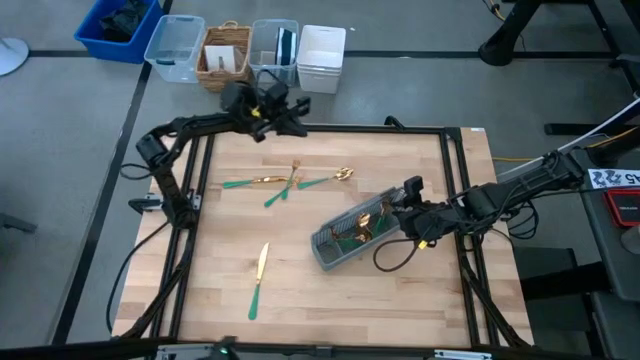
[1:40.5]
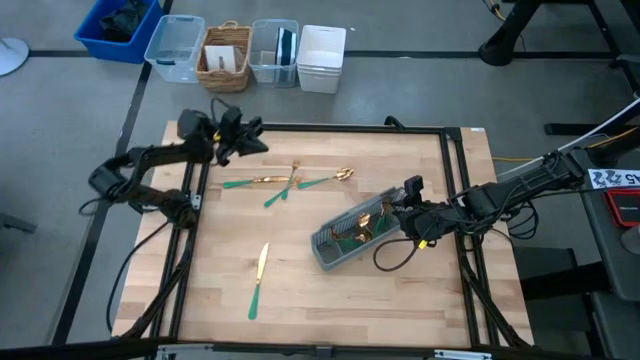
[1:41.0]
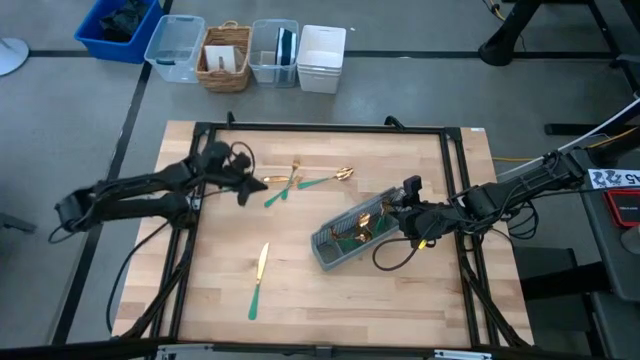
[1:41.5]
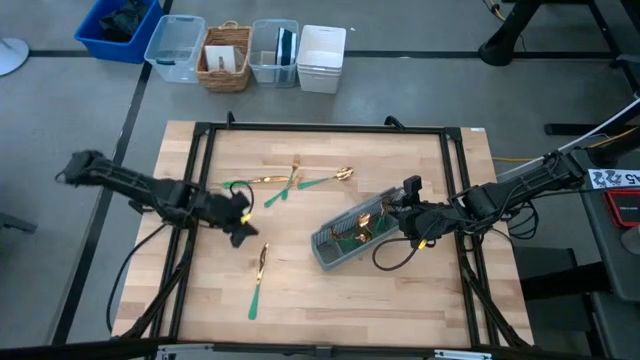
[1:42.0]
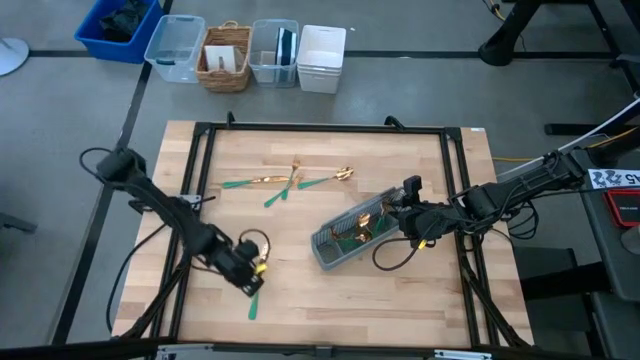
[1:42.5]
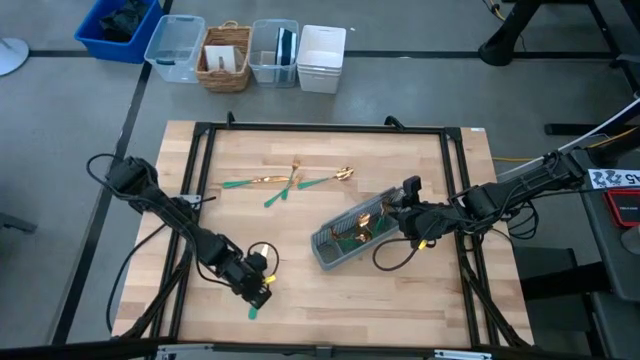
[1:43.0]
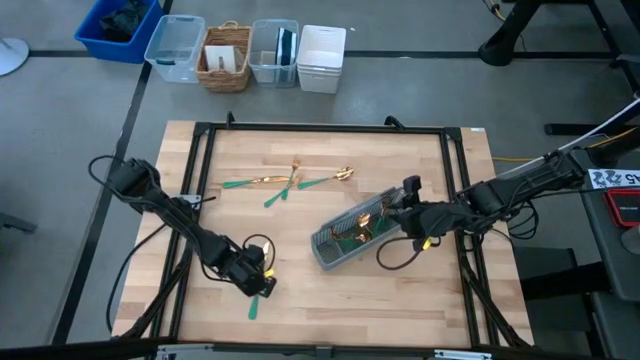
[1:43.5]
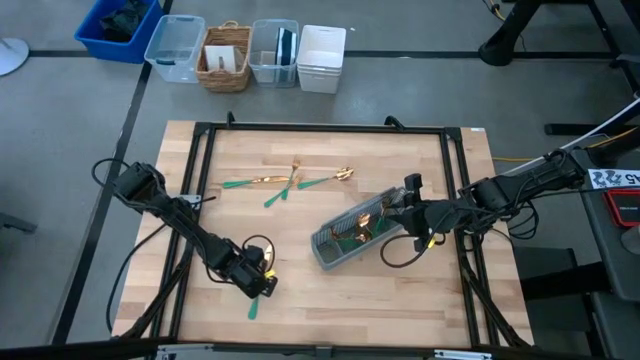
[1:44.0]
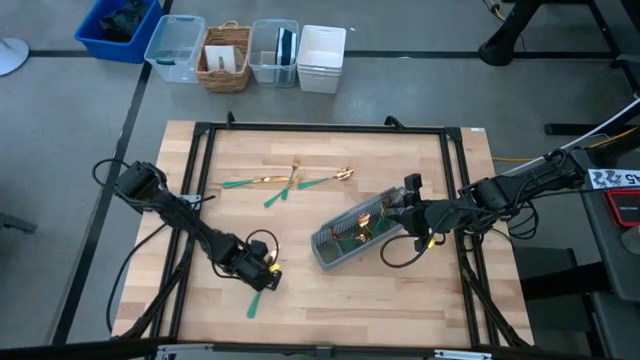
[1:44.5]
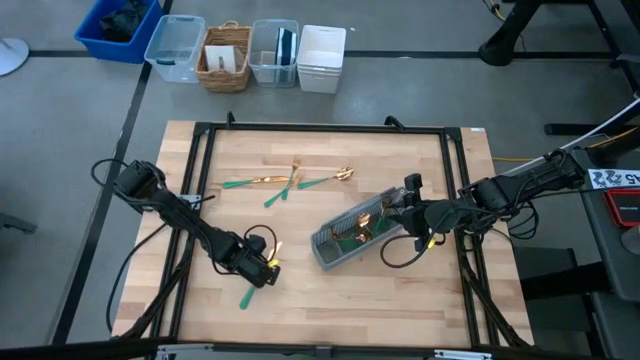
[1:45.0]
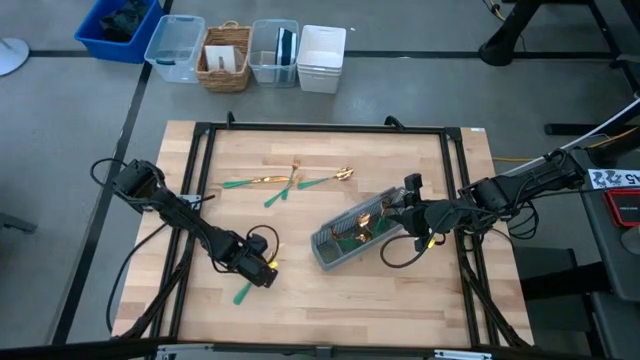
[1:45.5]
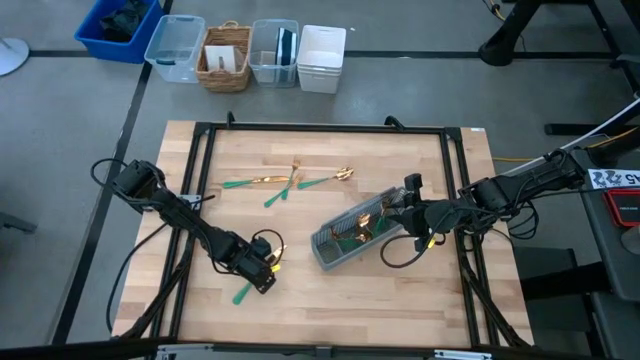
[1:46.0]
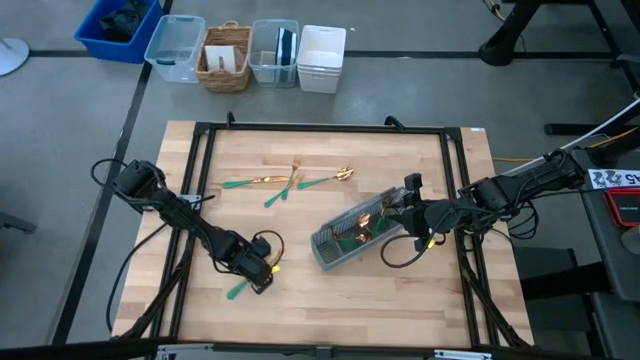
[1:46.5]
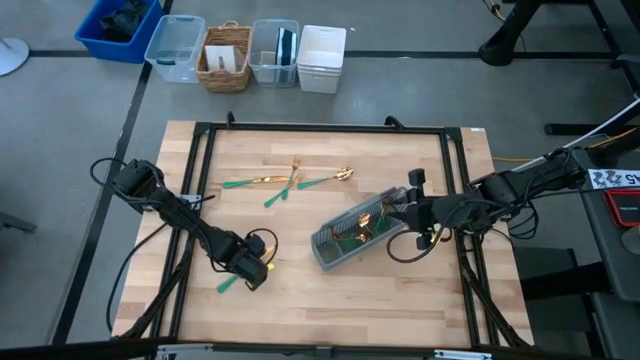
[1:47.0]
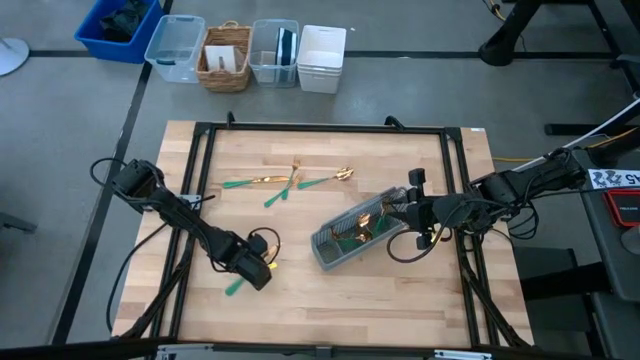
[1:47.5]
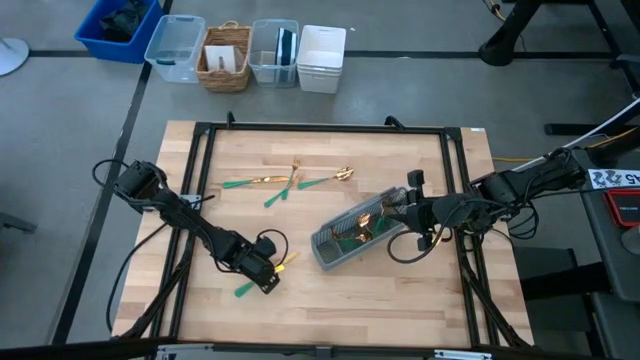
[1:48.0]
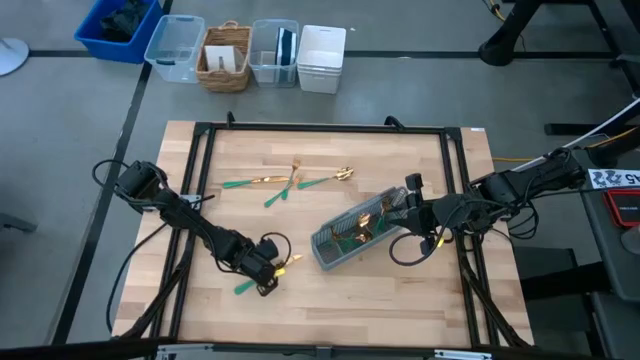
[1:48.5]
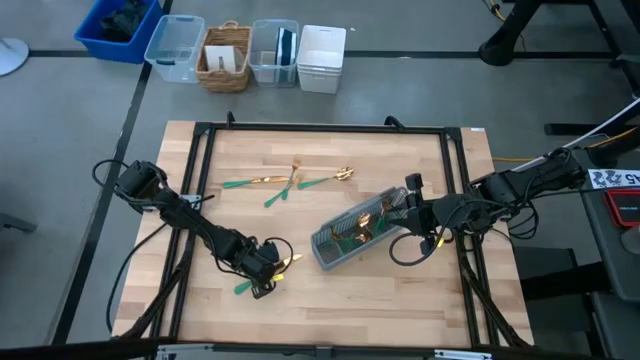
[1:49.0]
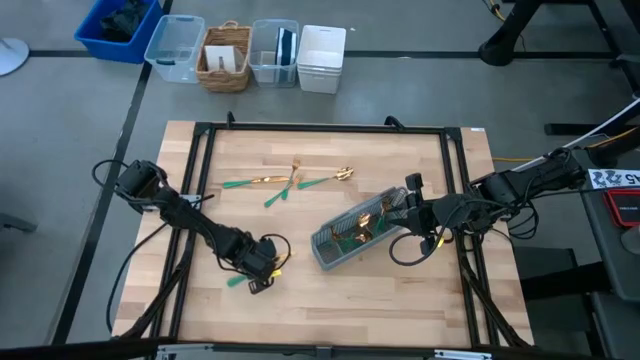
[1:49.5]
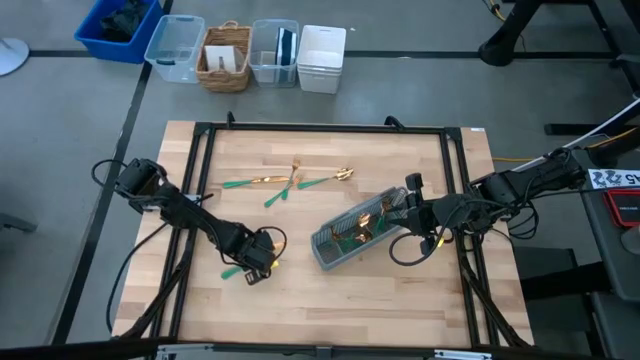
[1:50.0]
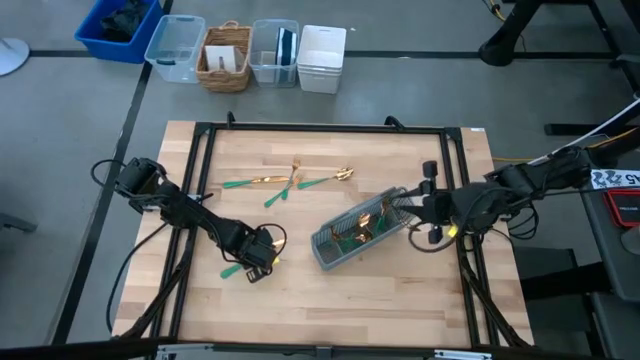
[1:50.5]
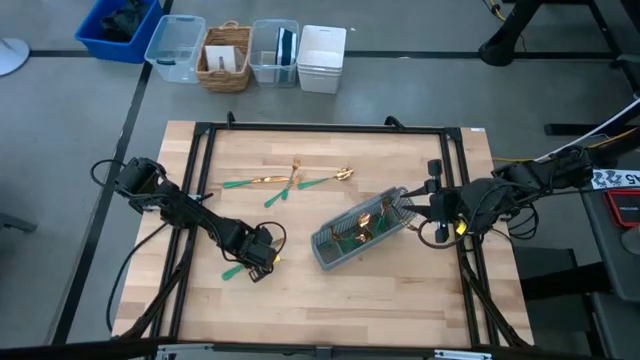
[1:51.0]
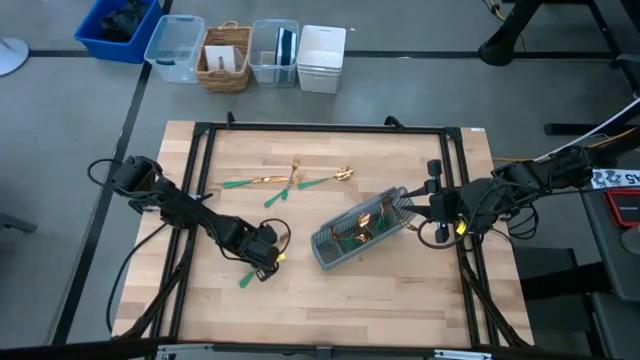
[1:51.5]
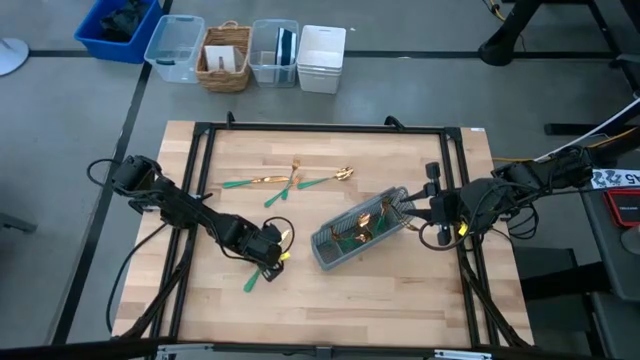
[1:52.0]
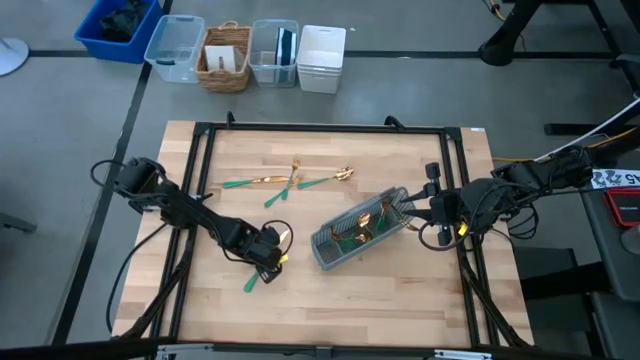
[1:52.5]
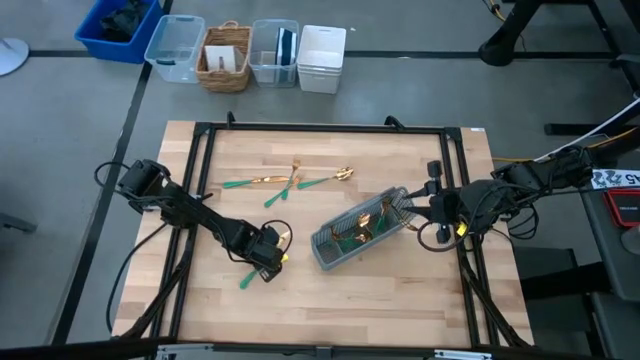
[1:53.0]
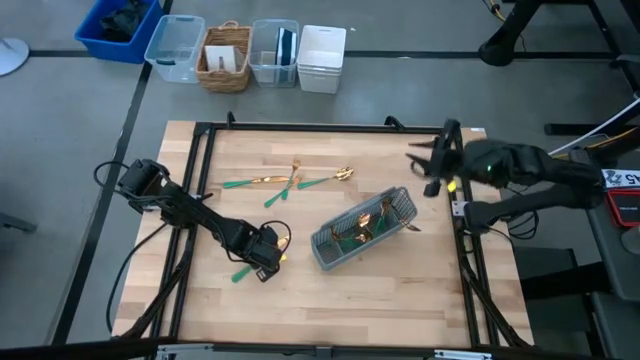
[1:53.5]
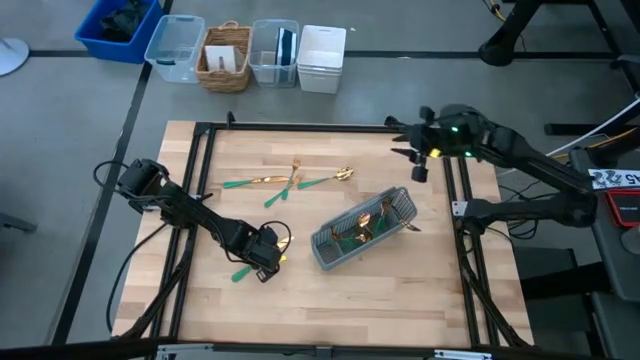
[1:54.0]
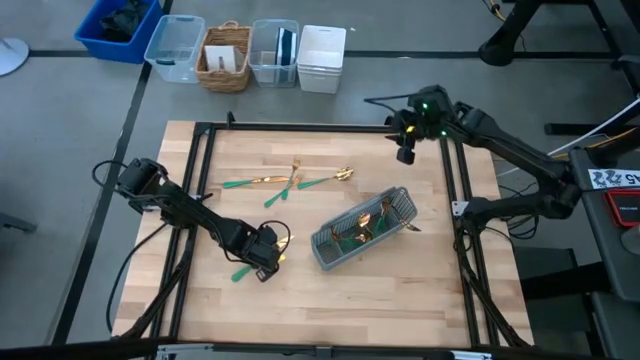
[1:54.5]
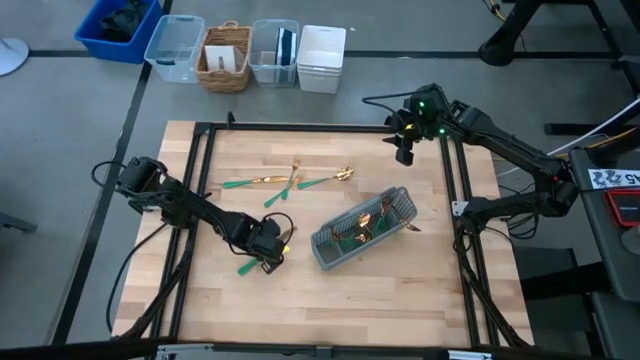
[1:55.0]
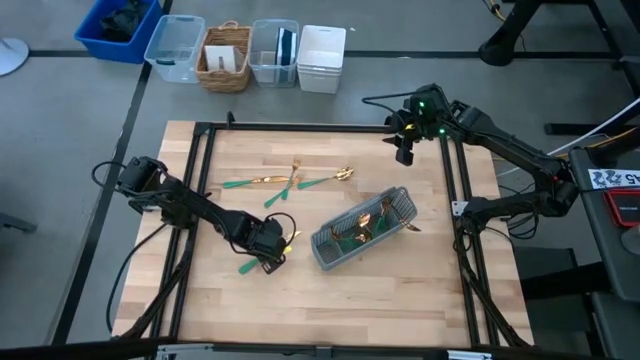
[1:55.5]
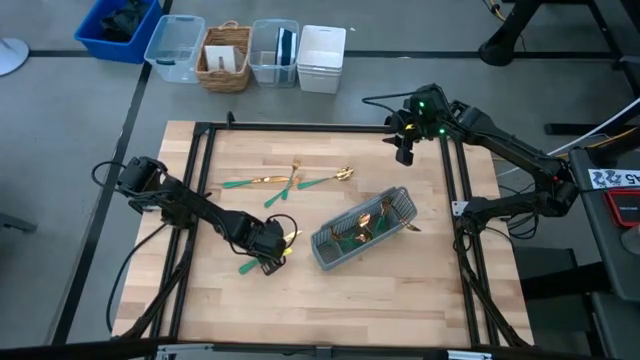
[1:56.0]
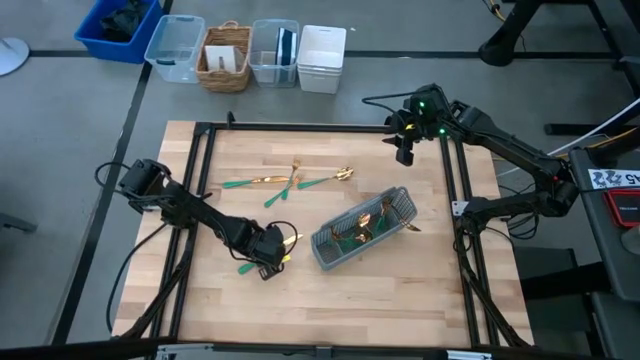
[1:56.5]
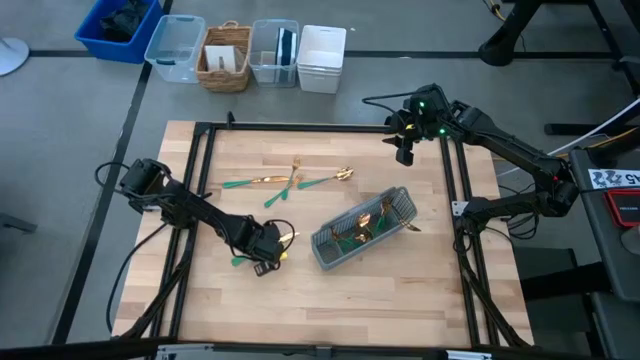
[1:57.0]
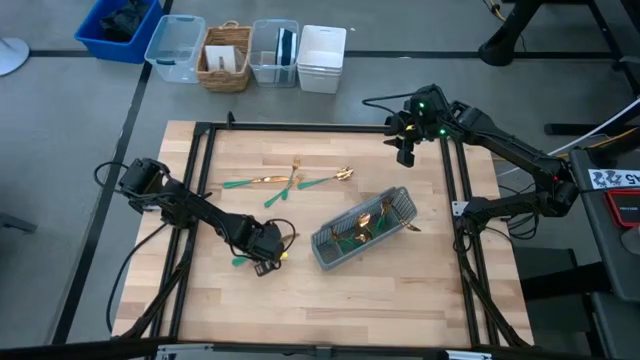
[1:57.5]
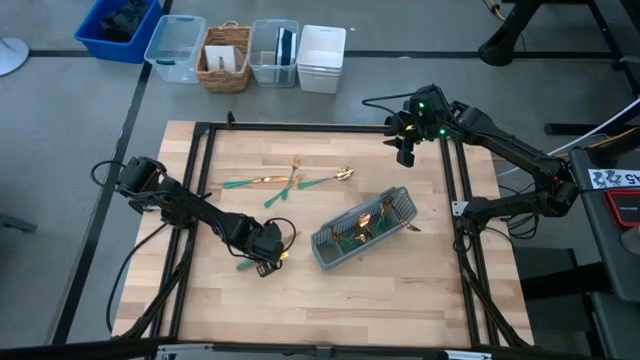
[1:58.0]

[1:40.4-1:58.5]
Task: Sort silverware
Put the gold knife into the gray silverware organizer

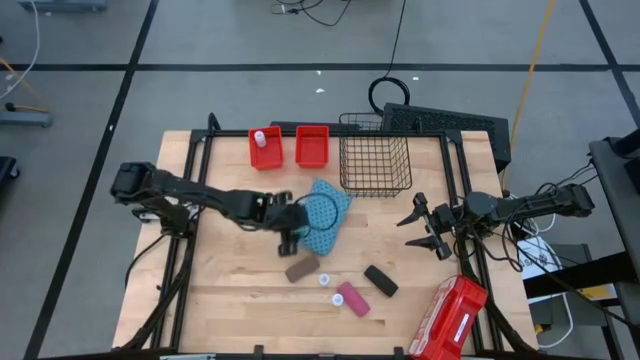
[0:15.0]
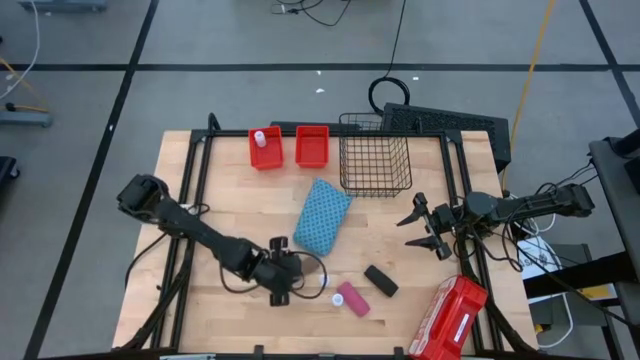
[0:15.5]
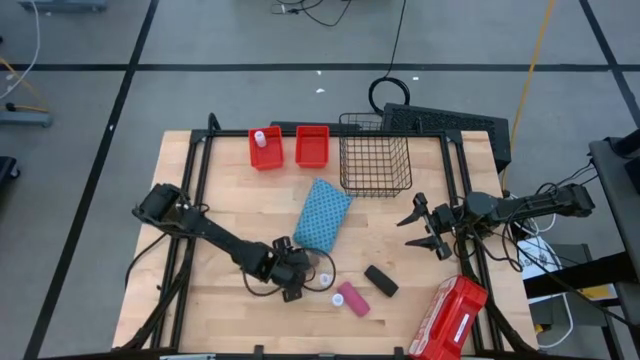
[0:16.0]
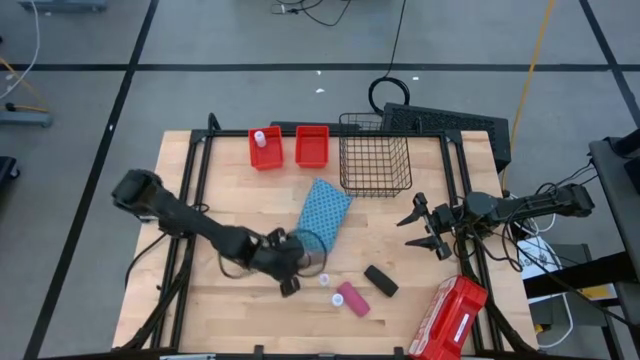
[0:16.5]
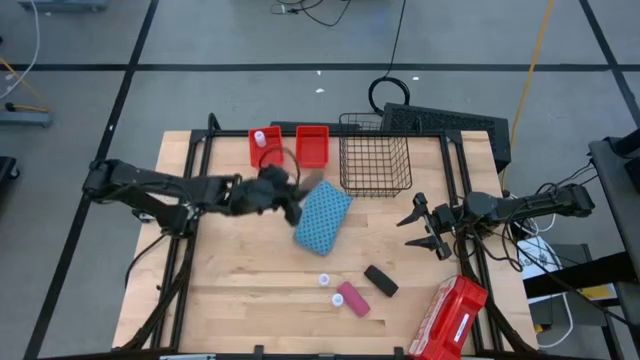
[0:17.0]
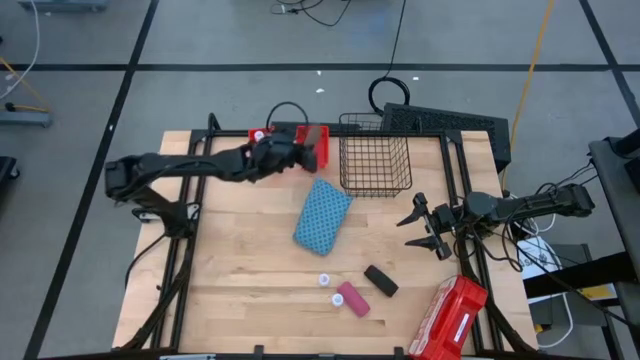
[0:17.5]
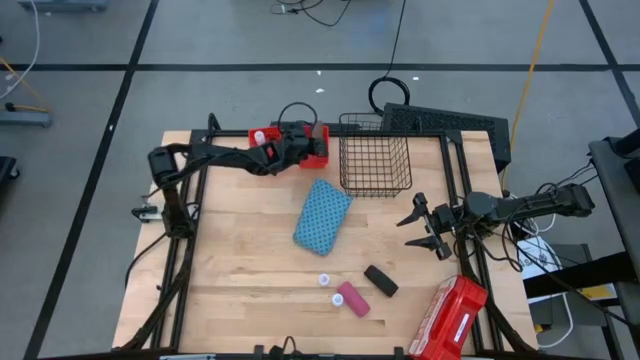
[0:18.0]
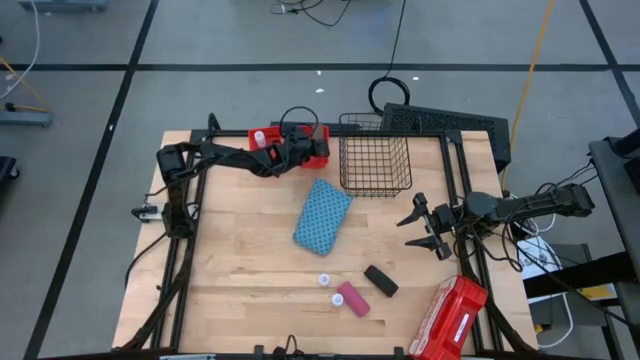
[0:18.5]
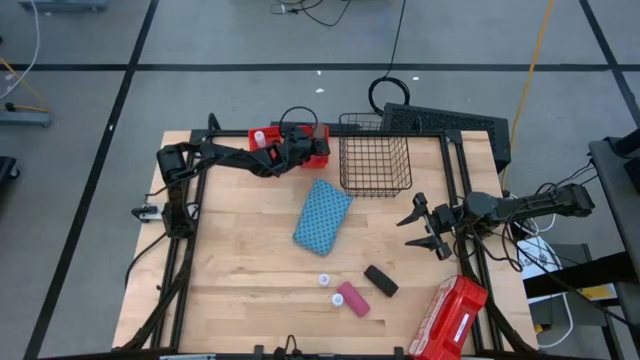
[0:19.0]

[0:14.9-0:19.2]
Task: Pick & Place Medicine items
Put the brown bandage into the right orange basket
